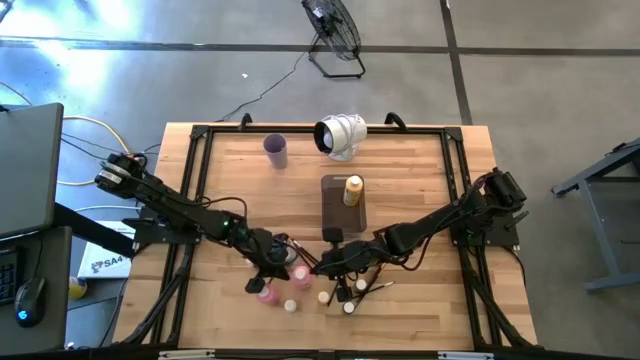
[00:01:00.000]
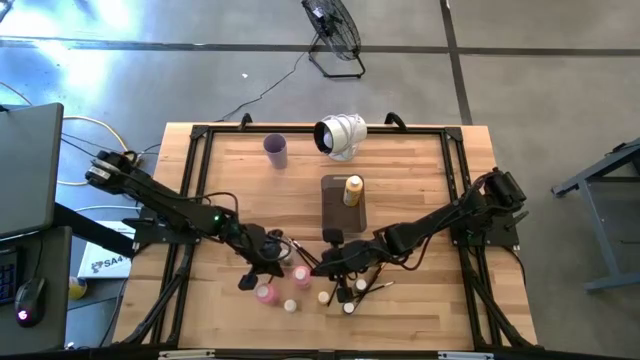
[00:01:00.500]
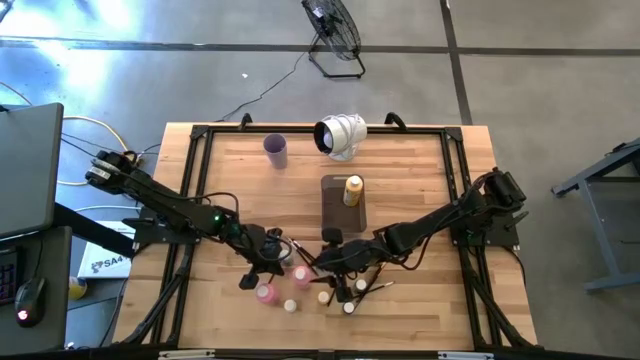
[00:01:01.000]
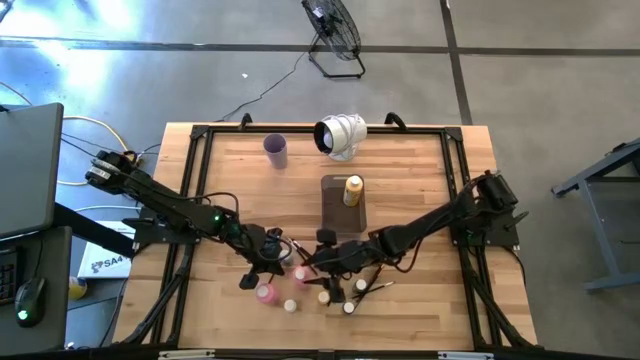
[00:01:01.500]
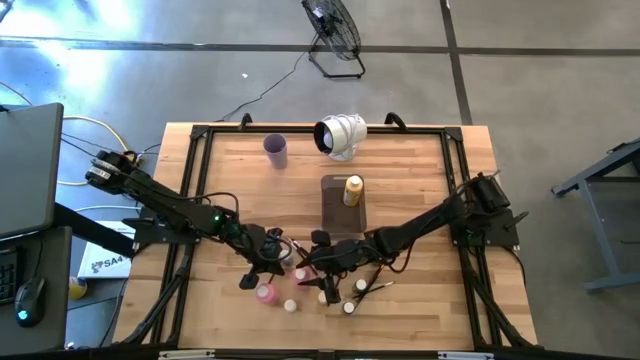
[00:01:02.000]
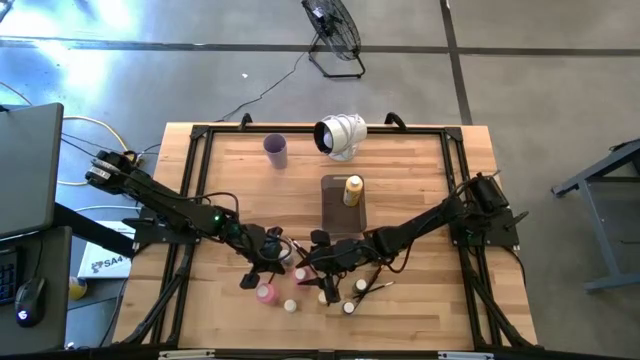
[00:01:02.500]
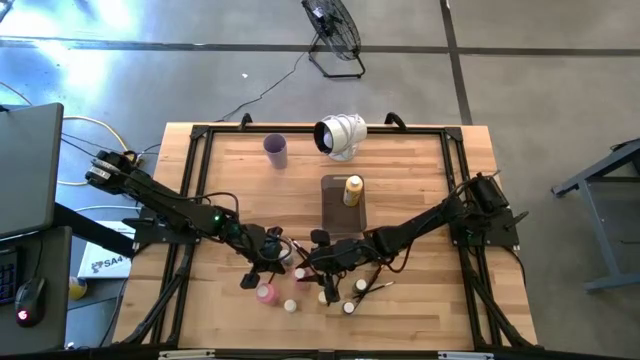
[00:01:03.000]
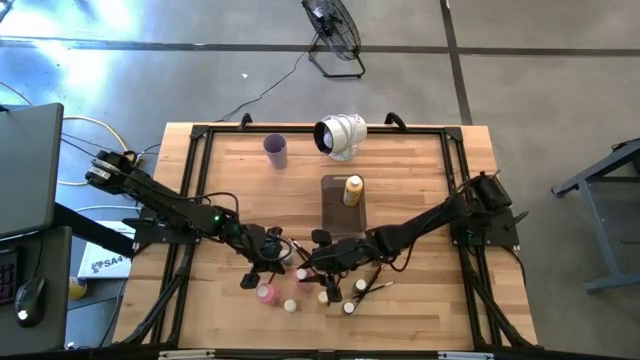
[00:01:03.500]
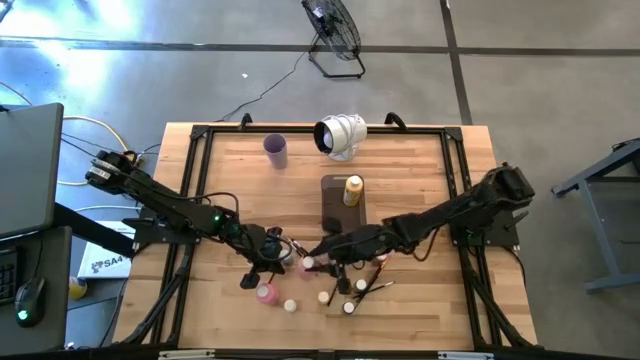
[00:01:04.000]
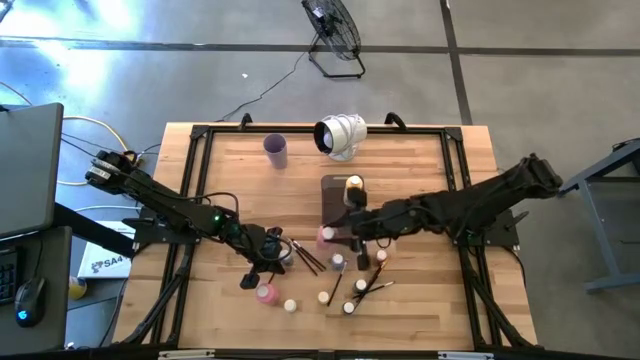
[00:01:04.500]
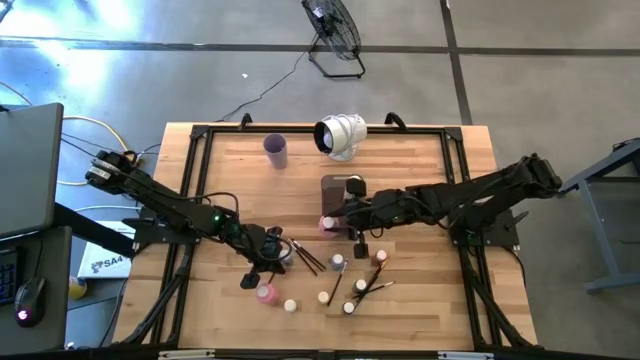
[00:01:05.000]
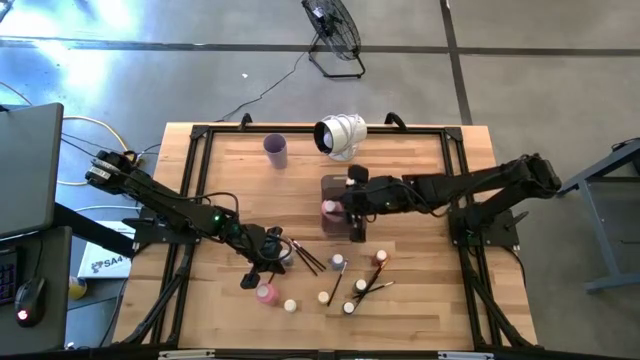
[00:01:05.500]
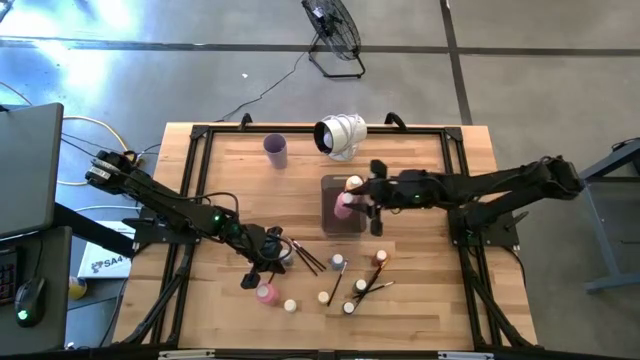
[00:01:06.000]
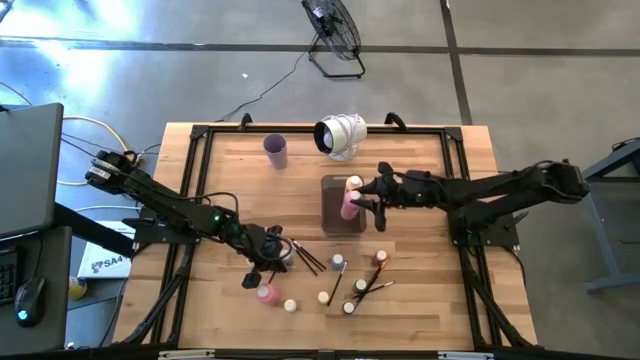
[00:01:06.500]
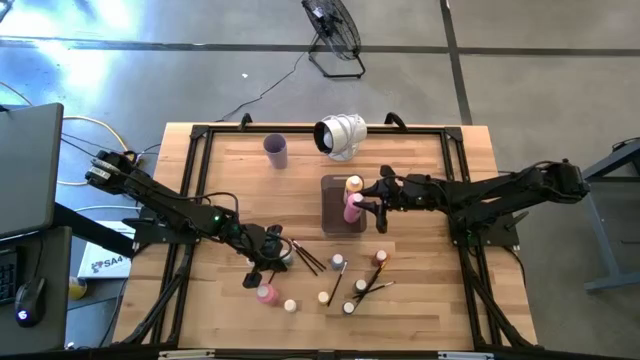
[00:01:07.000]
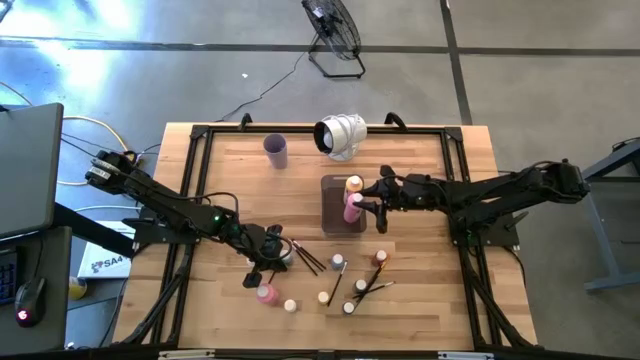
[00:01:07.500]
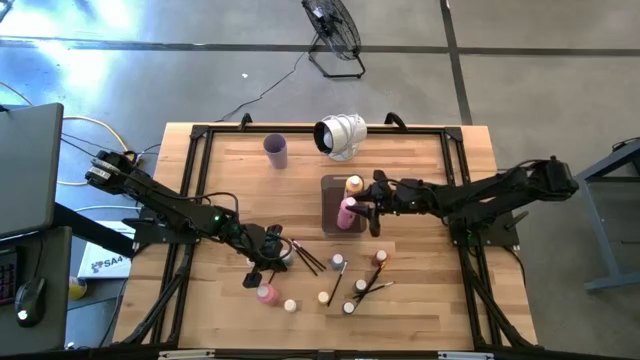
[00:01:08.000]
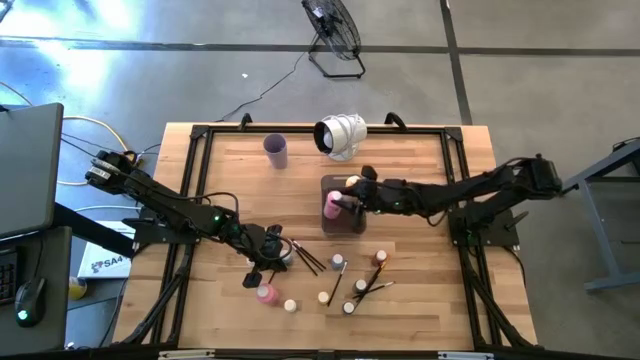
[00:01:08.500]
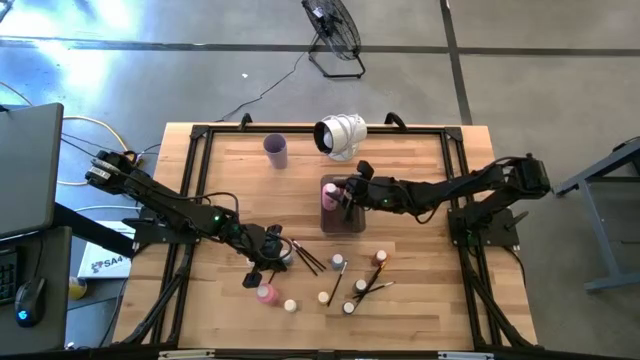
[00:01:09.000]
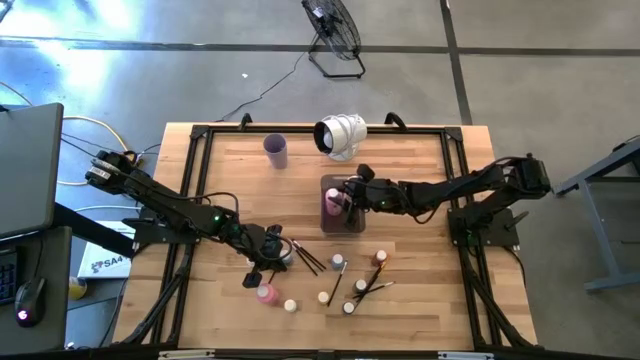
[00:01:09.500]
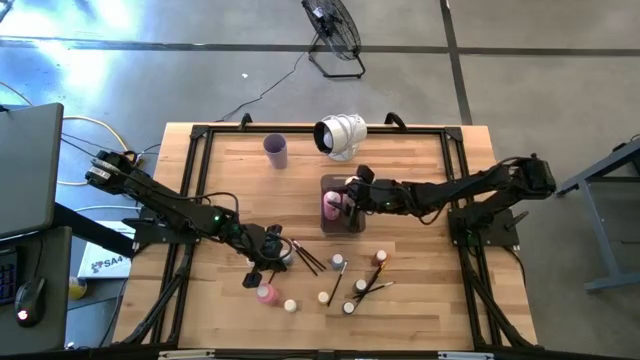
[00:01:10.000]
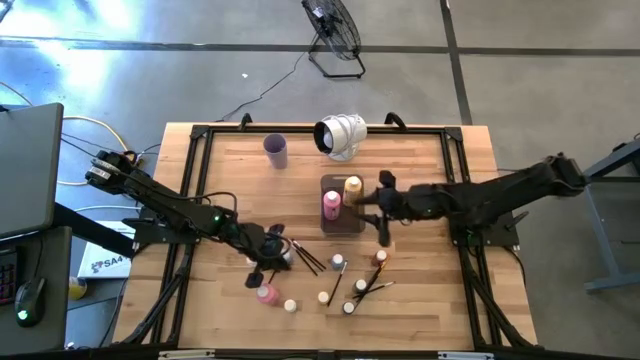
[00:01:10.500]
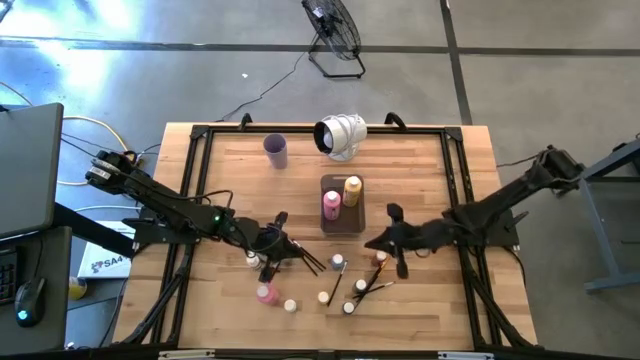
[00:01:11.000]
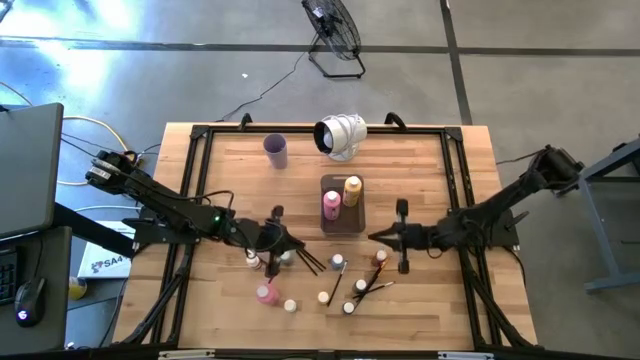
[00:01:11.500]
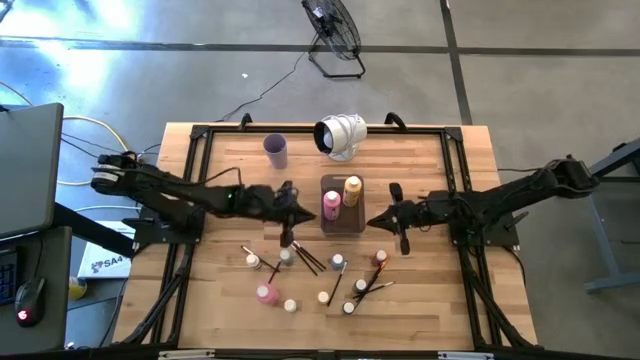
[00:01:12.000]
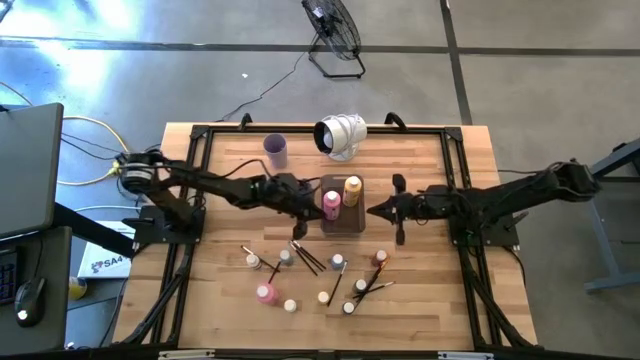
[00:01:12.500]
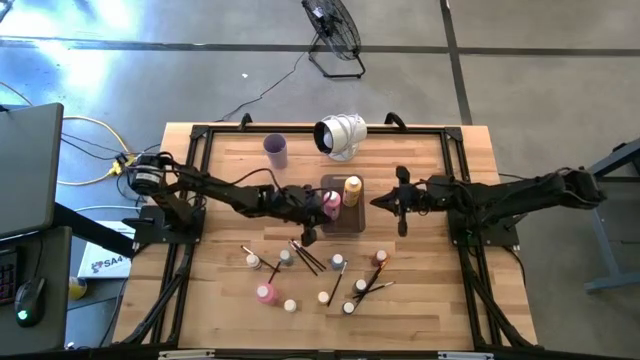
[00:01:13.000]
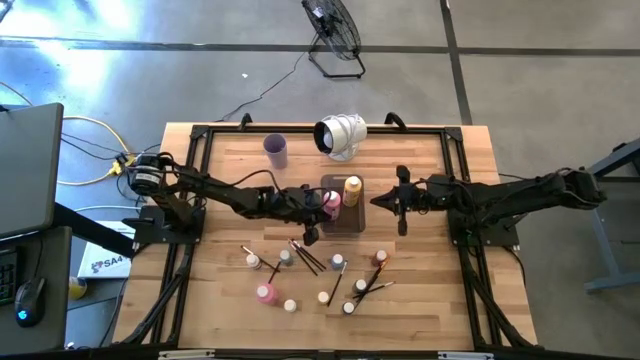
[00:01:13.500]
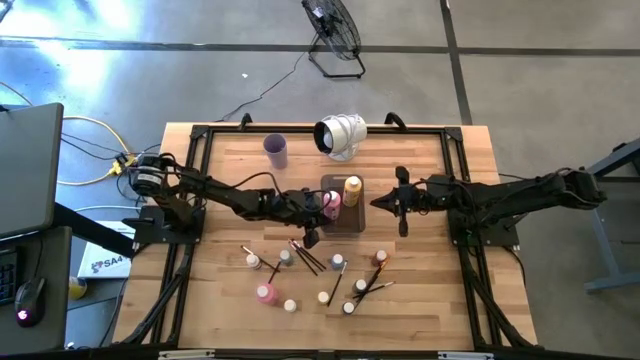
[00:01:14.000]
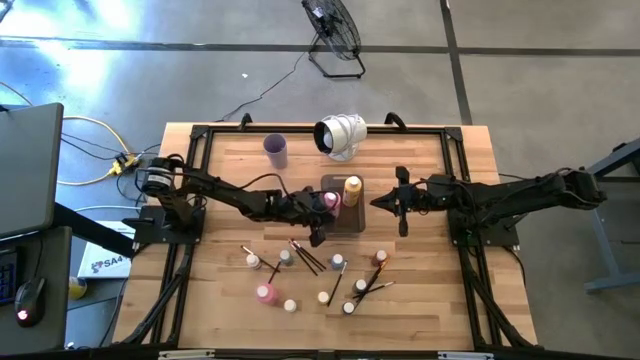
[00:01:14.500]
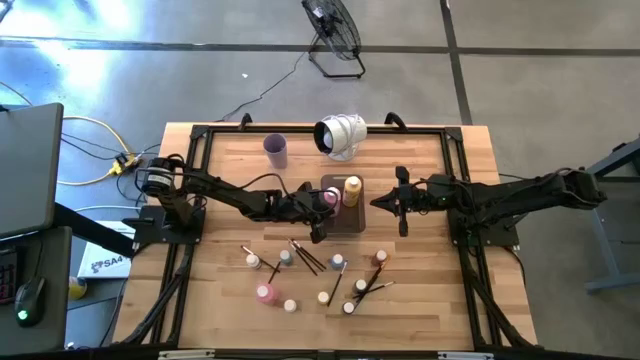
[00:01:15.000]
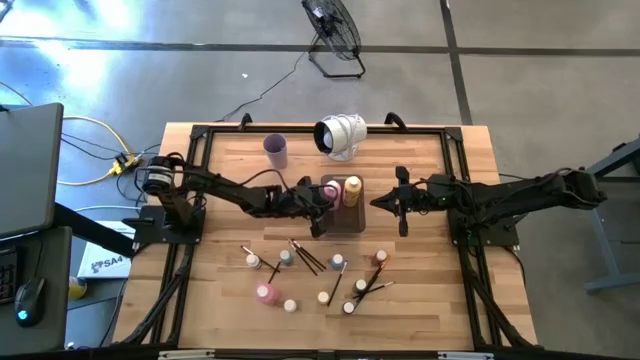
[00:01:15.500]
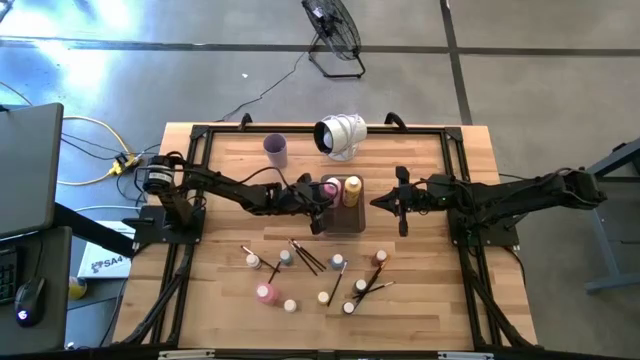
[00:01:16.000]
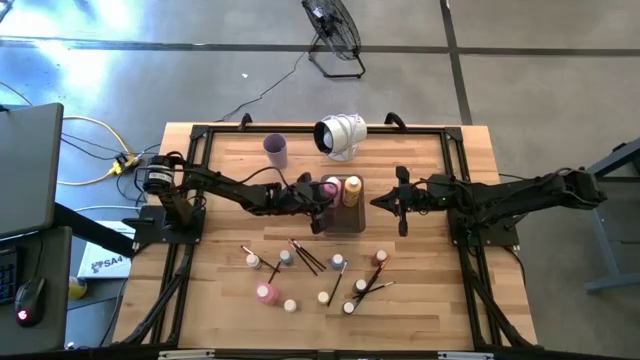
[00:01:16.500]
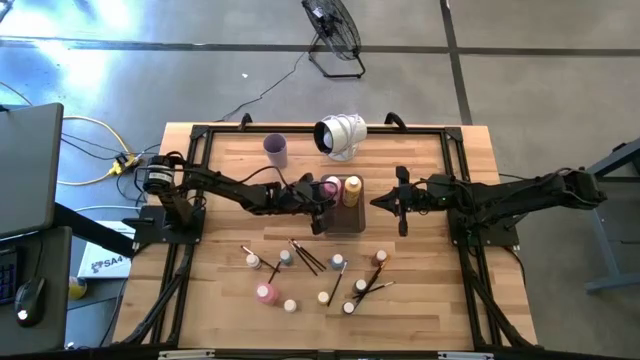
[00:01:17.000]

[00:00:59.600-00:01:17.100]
Task: Pick & Place Paint Supplies
Put the top pink paint bottle into the black bin

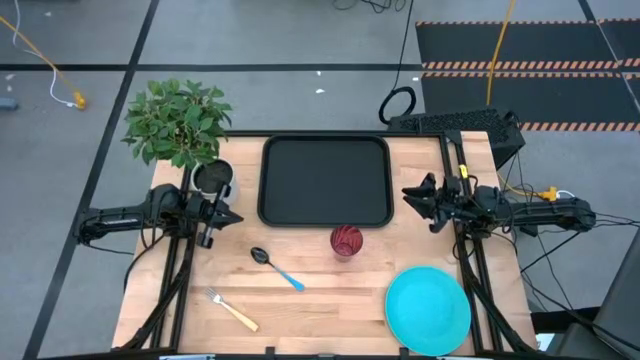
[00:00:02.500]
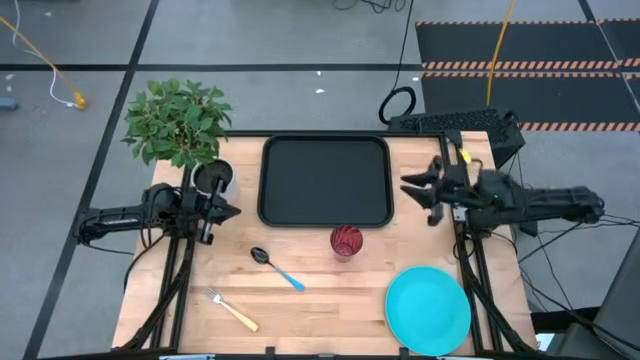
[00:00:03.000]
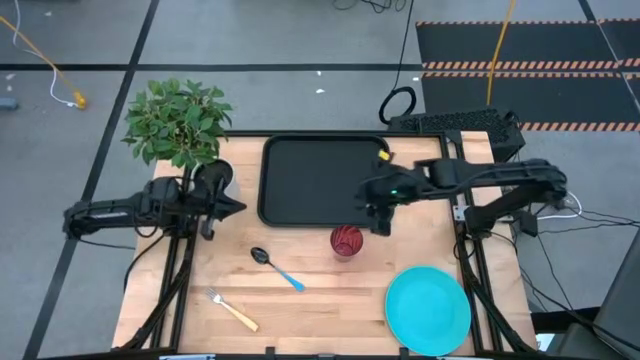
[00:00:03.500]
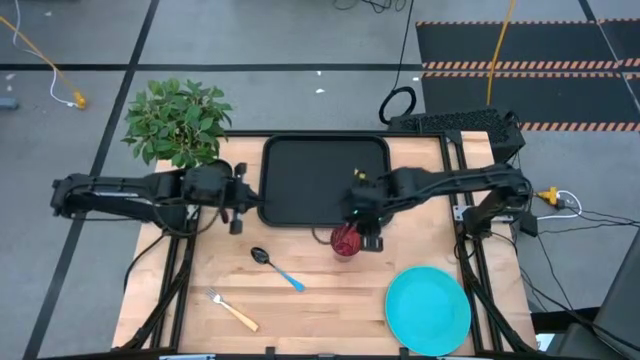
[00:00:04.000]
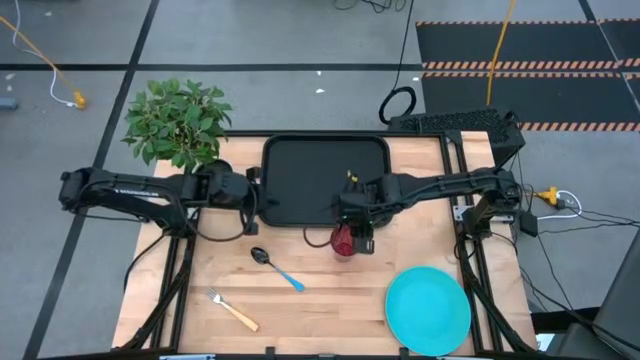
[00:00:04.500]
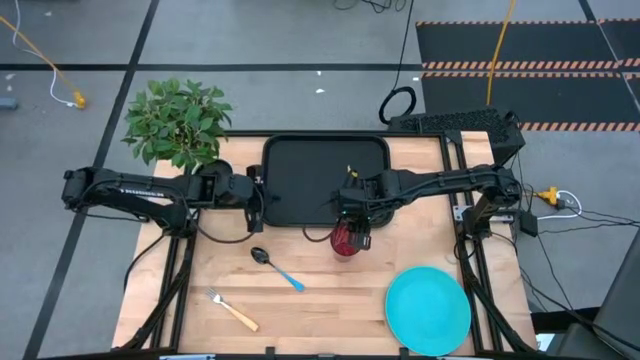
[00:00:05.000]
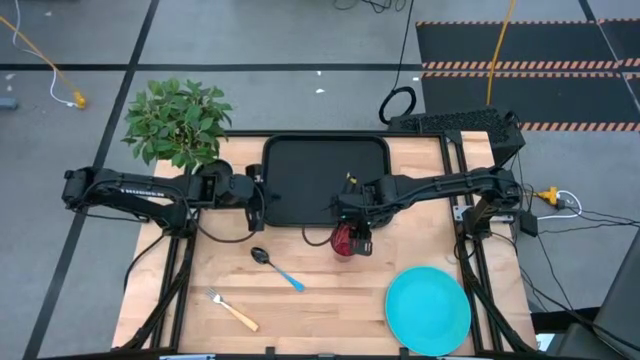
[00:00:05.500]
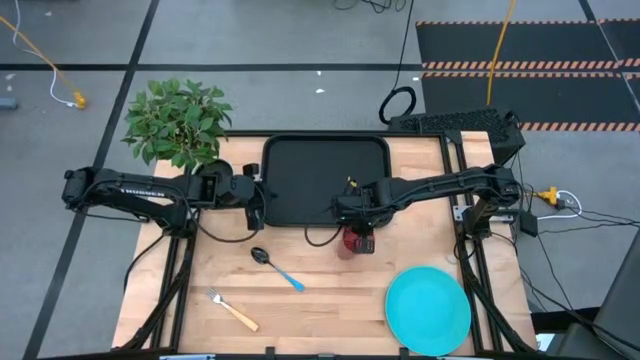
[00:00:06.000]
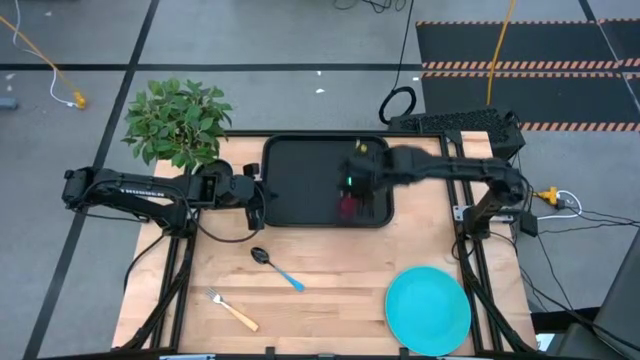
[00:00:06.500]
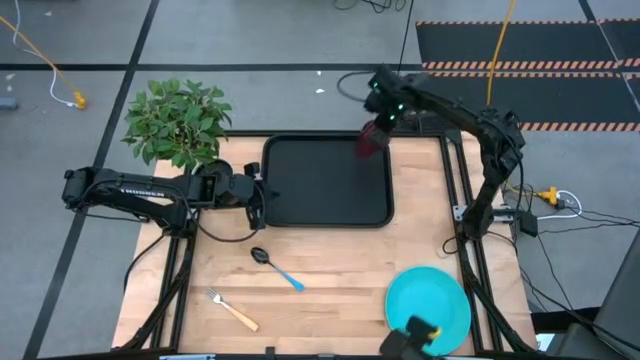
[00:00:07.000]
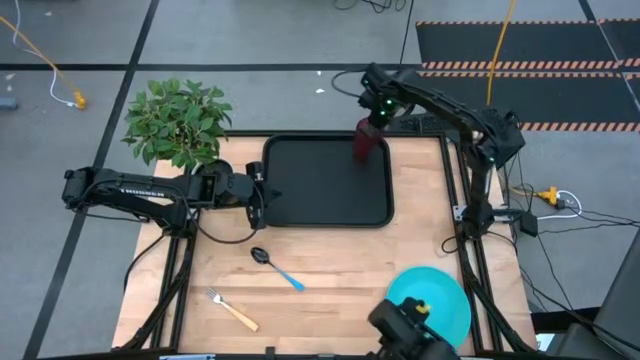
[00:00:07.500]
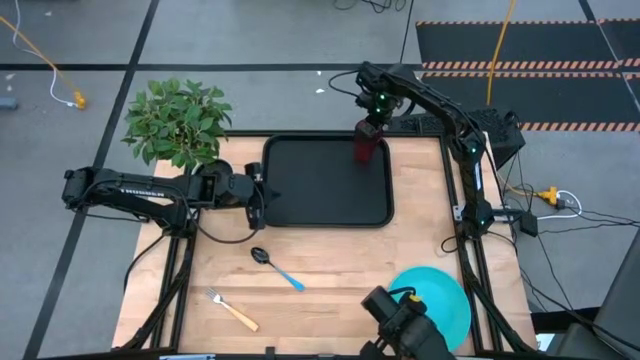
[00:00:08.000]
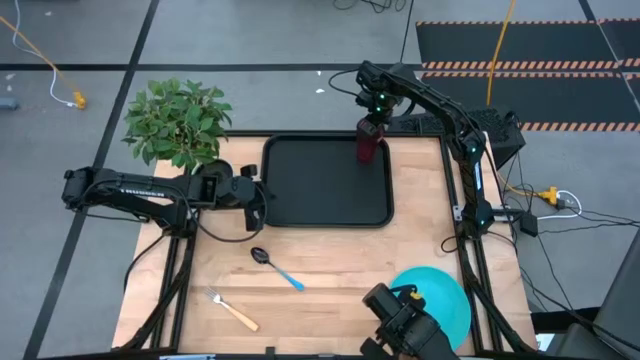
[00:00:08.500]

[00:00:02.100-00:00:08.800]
Task: Pick and place plate/cup/fork/spoon on tray
Put the red glass on the black serving tray
